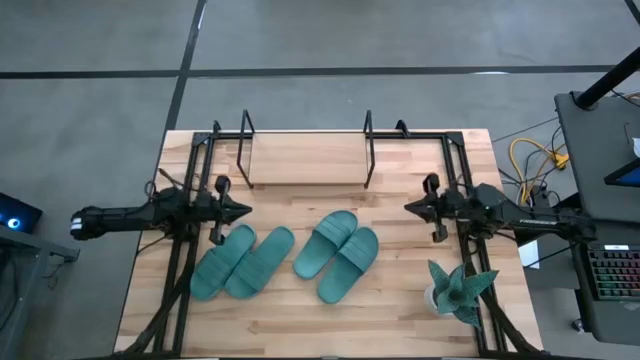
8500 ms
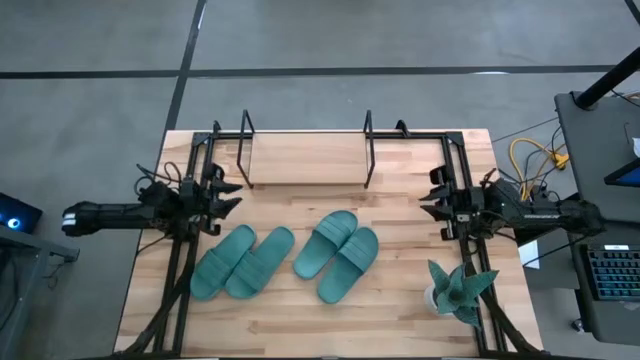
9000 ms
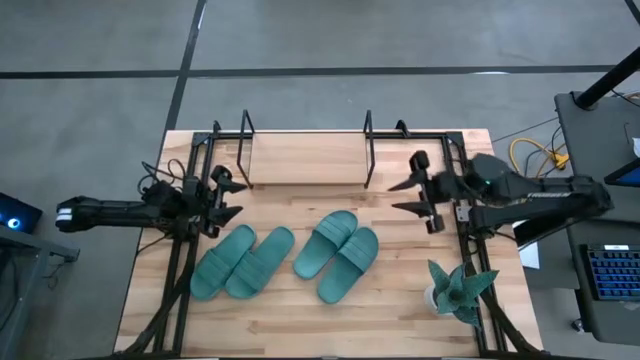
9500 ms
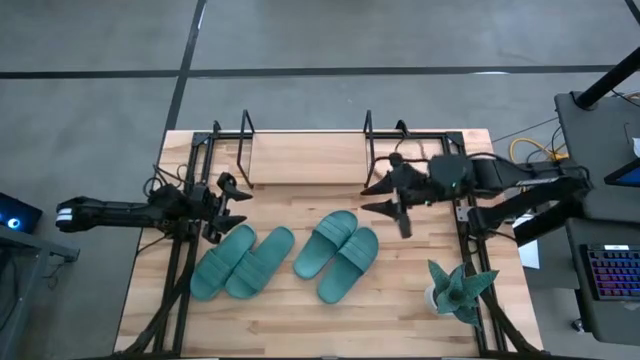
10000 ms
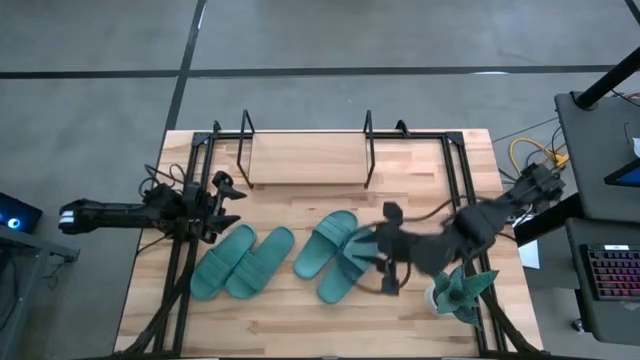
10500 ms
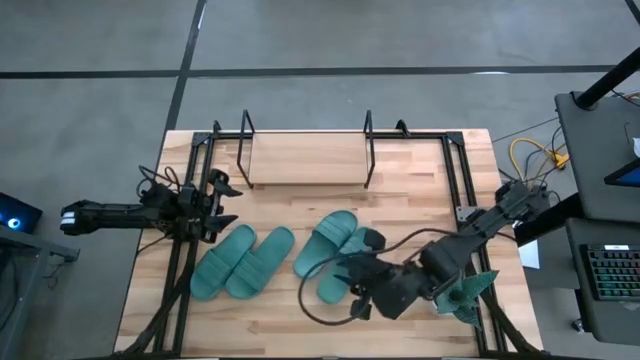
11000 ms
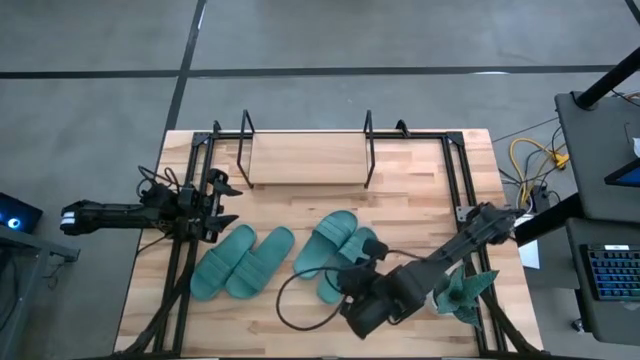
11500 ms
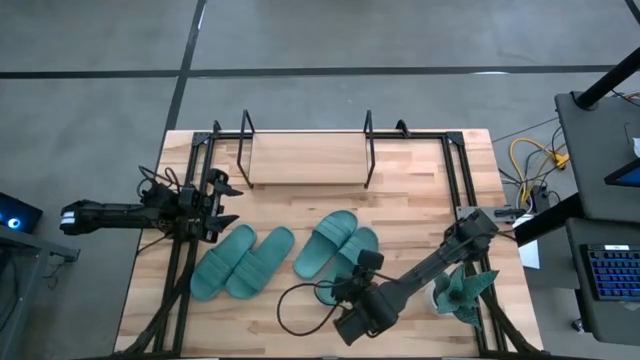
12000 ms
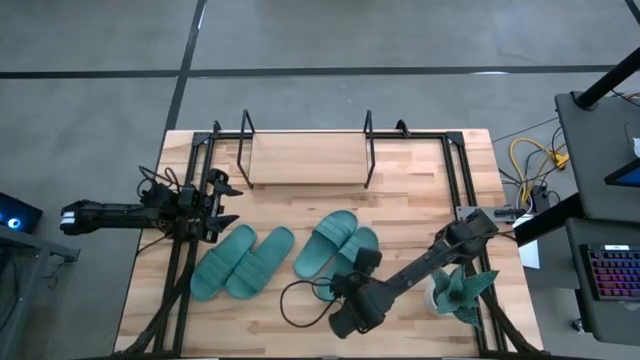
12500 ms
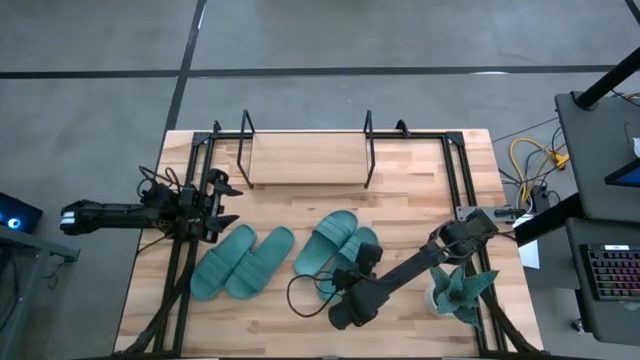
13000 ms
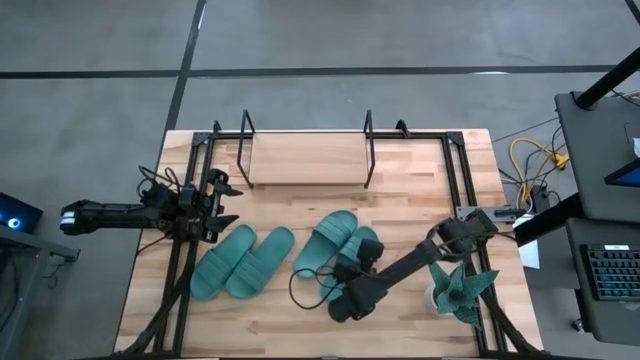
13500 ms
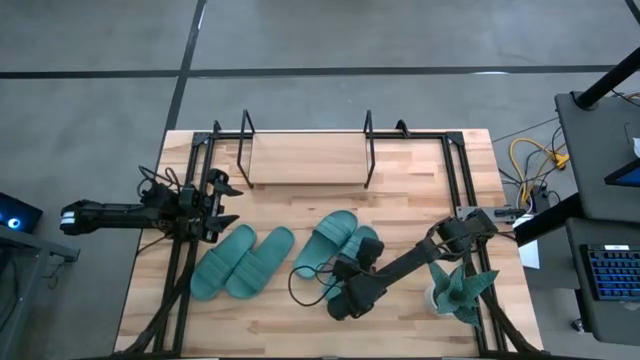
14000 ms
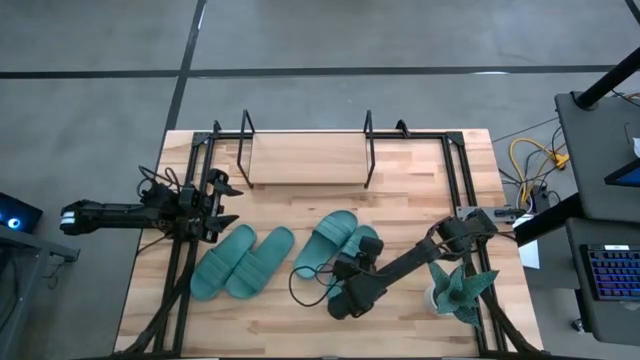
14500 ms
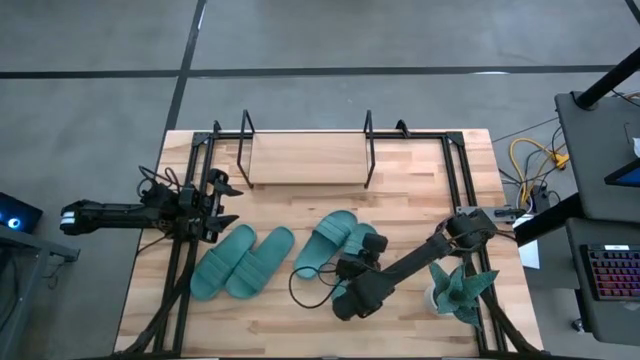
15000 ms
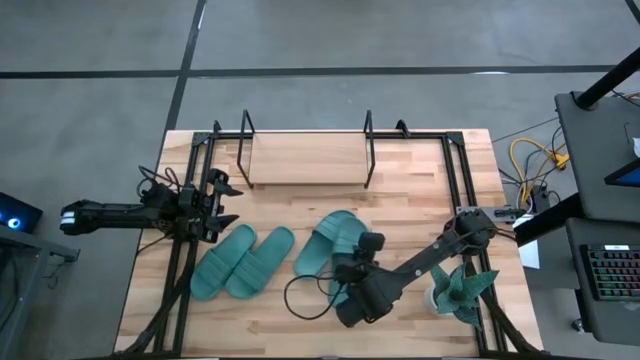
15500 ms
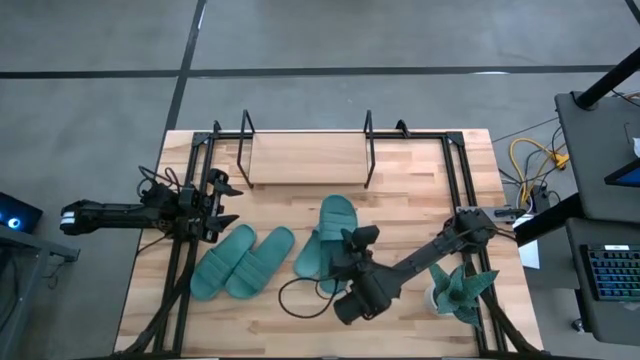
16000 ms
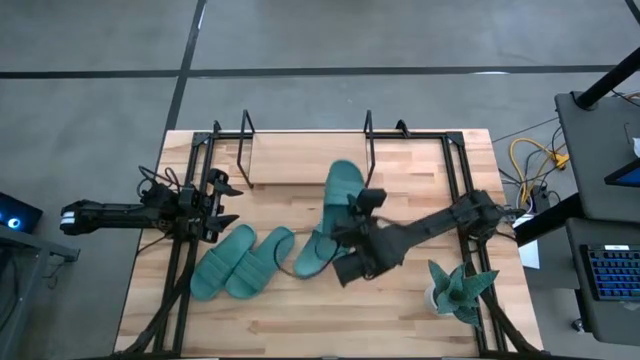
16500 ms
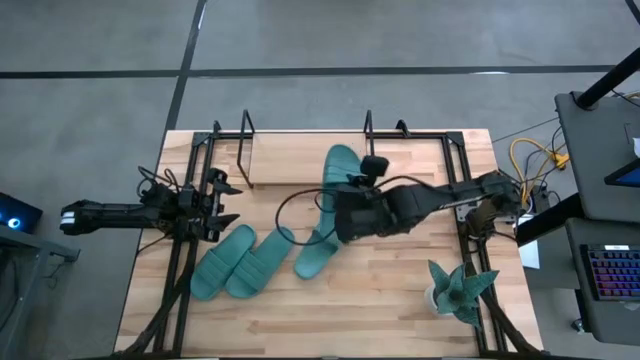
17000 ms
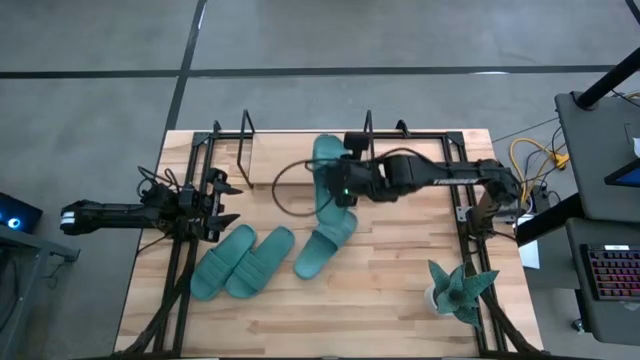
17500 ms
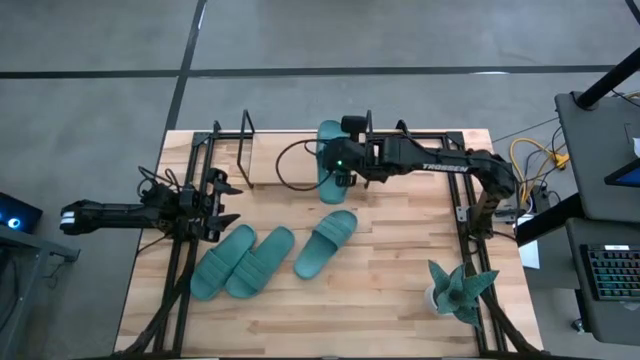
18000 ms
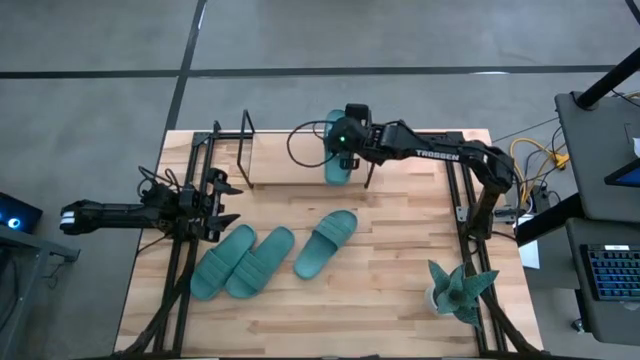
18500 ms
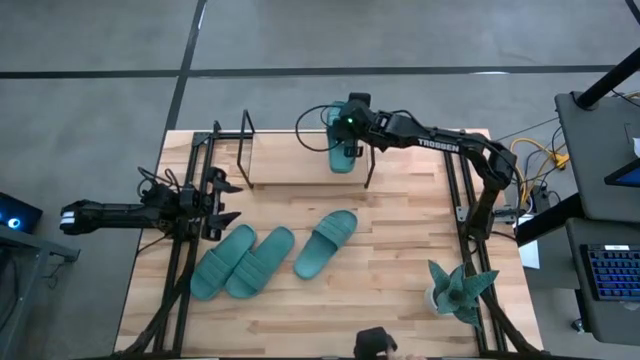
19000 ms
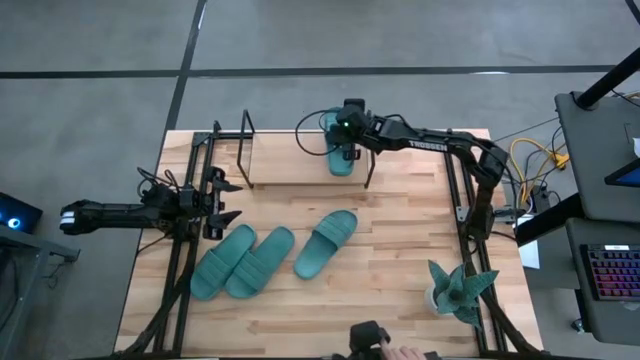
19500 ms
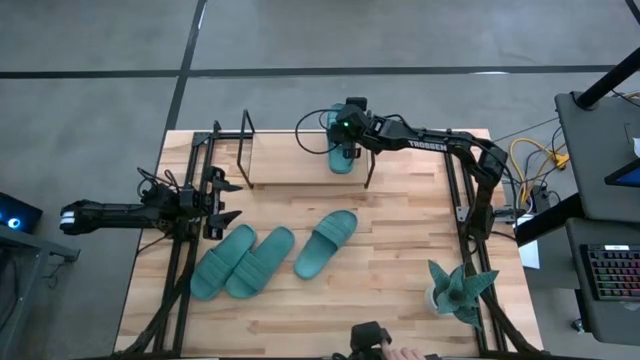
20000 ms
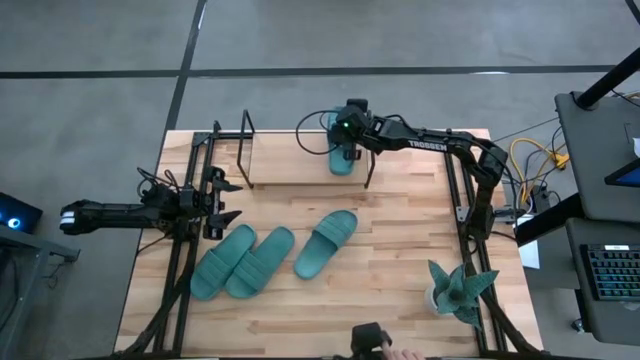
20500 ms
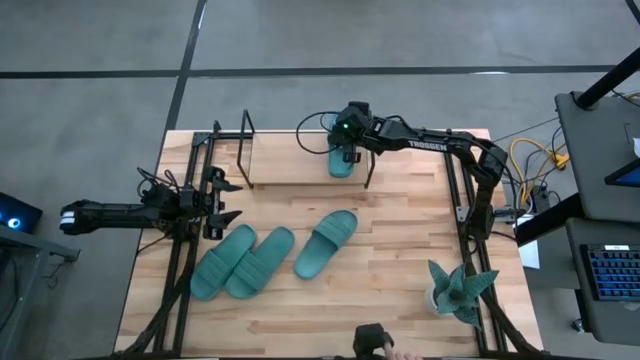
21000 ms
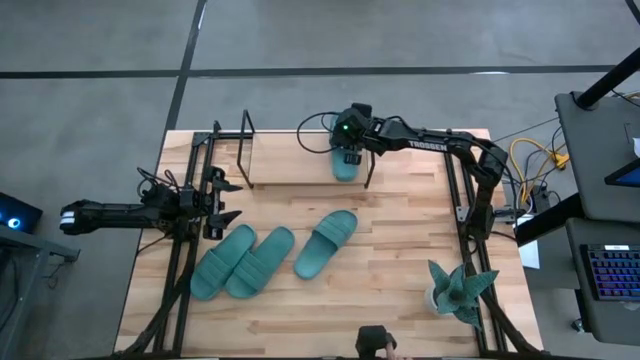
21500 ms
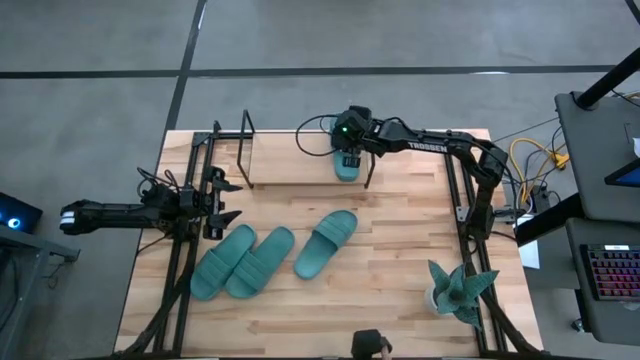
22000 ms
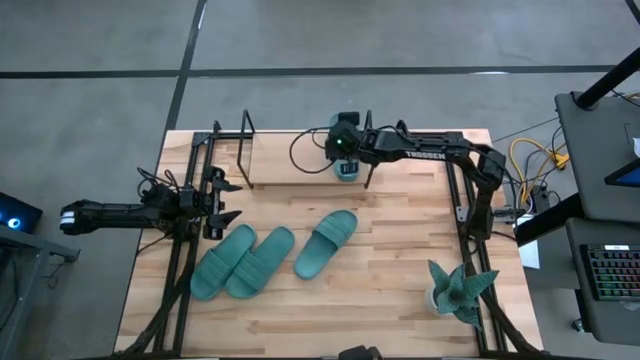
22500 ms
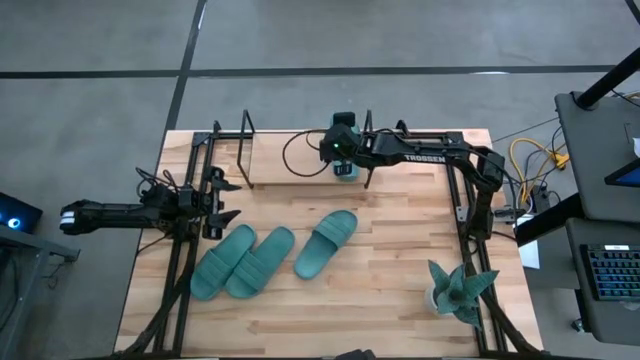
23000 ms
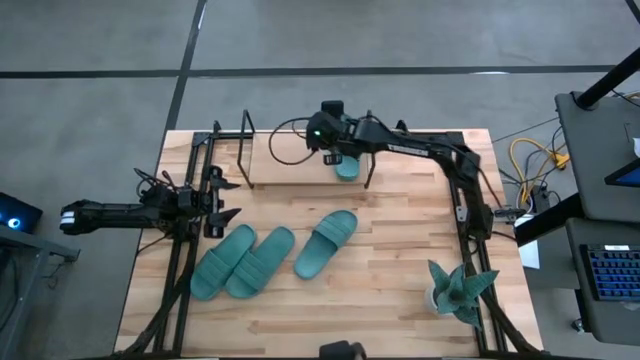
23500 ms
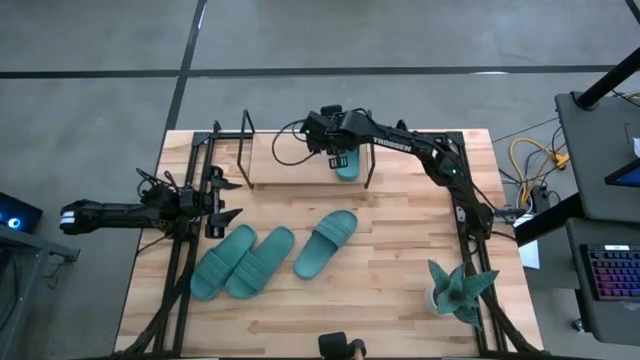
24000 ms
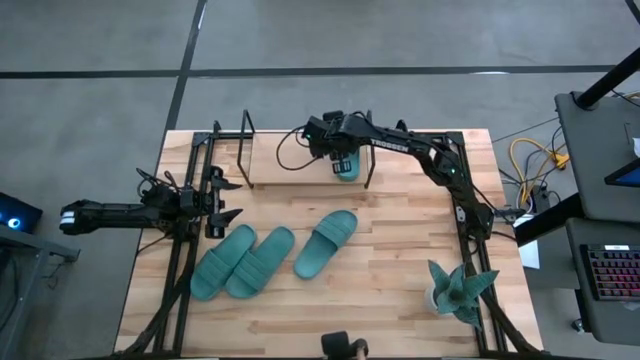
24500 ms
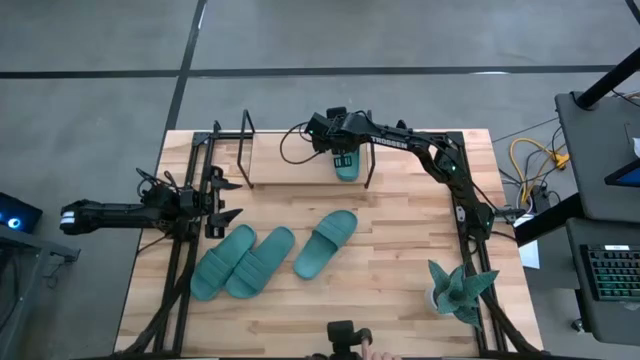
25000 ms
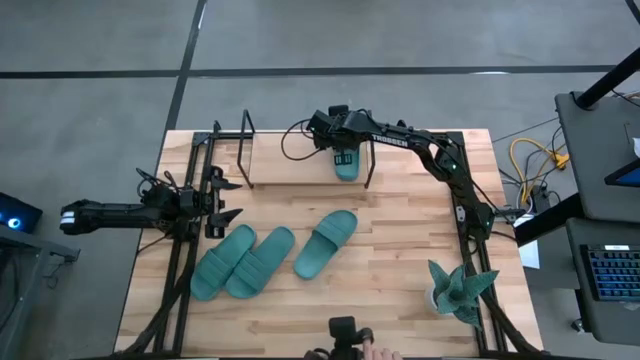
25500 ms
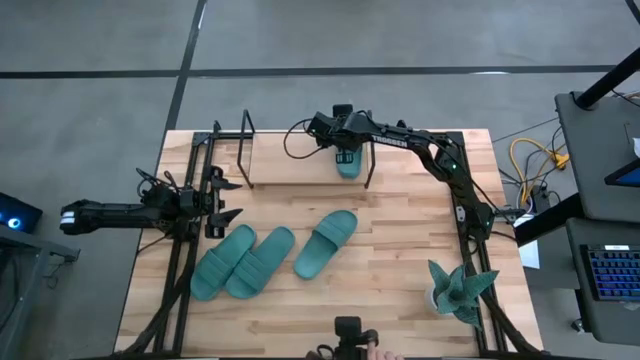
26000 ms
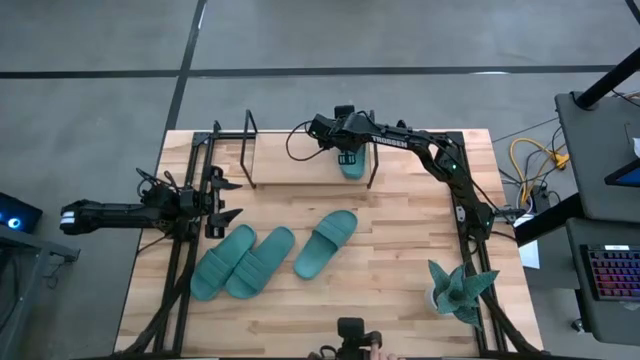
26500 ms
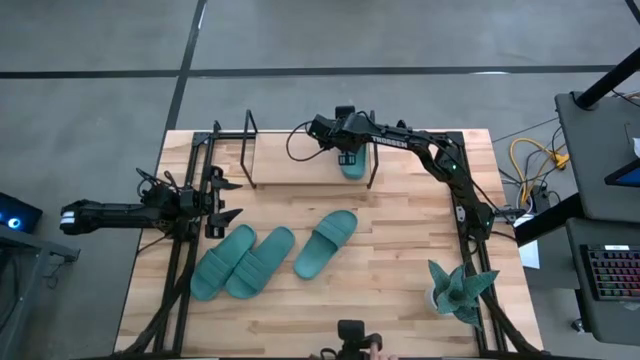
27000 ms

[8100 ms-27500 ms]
Task: Pick and place slides into the shelf
Put the blue slide on the shelf

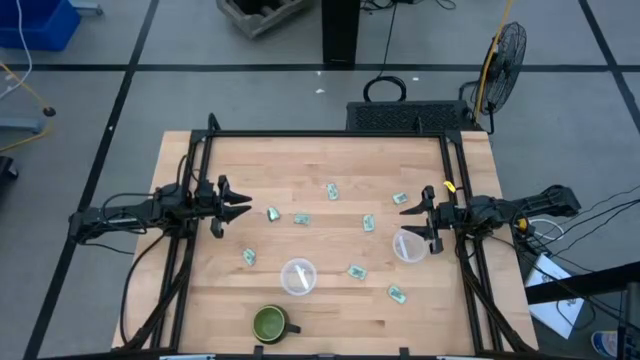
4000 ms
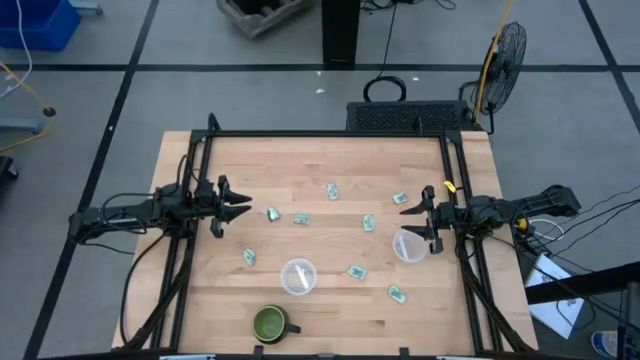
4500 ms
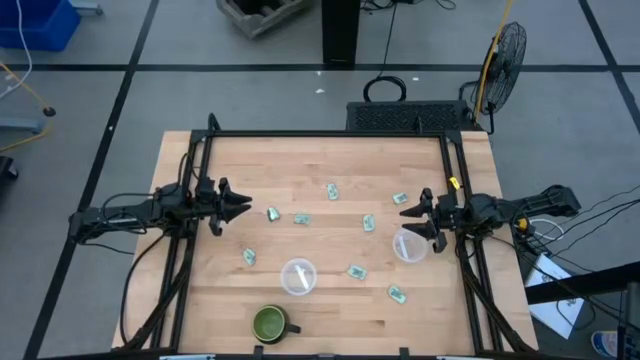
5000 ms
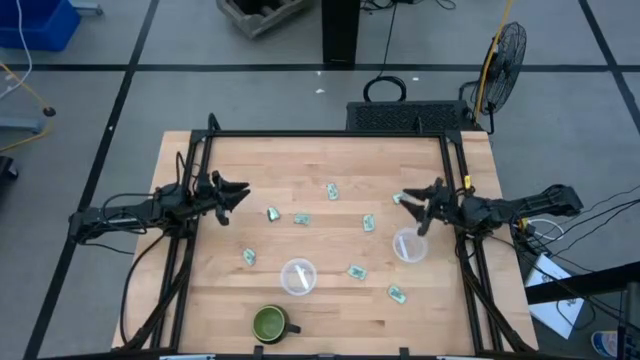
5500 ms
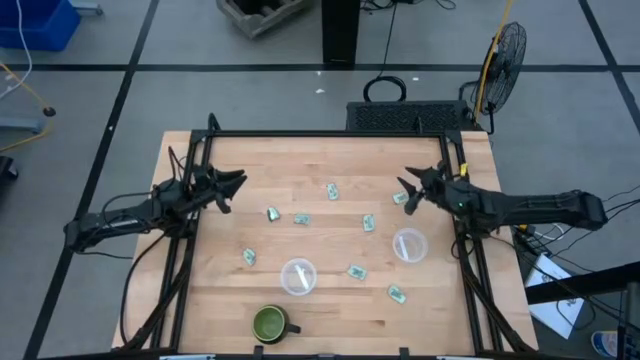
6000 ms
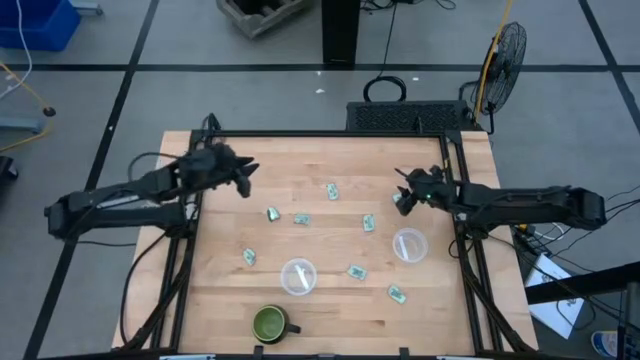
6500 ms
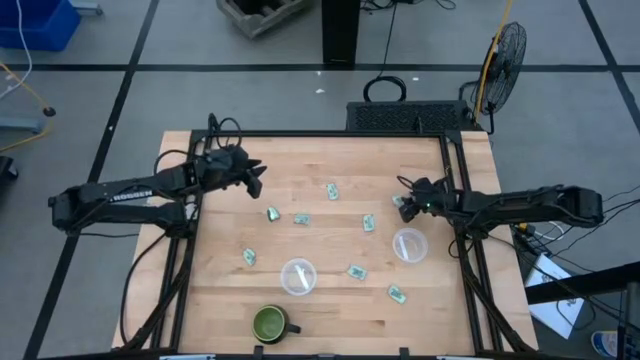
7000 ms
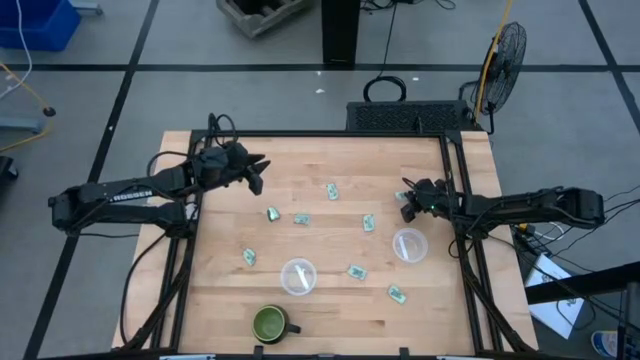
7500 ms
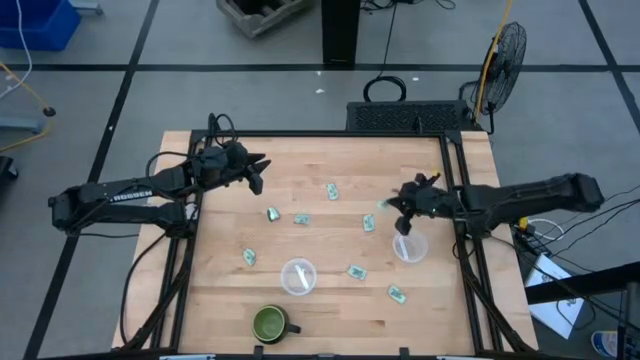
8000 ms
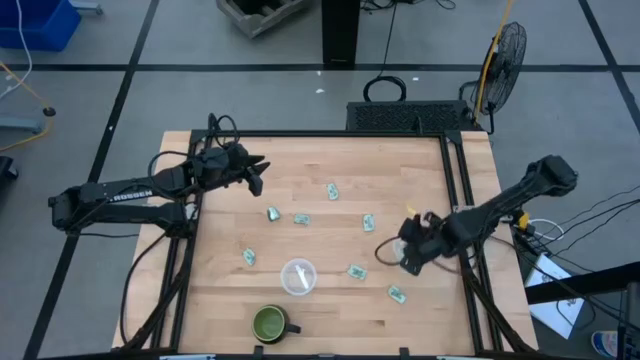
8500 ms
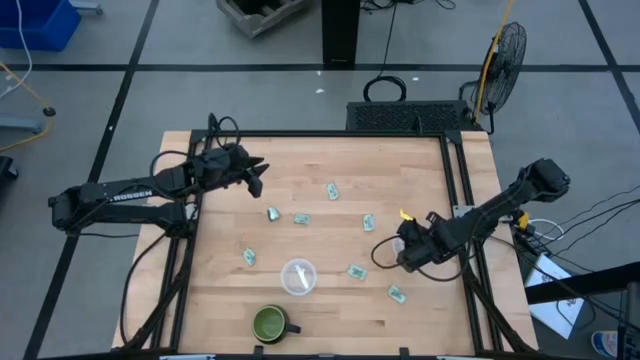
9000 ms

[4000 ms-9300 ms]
Task: Pick and place Stevia / Truvia into bins
Put the white stevia packet into the right transparent container
